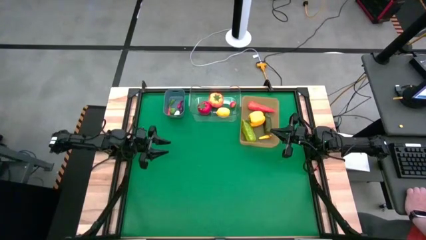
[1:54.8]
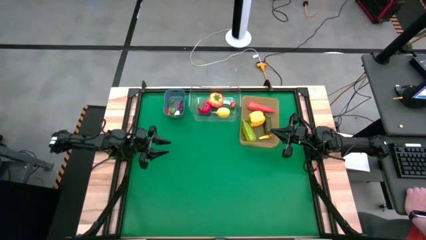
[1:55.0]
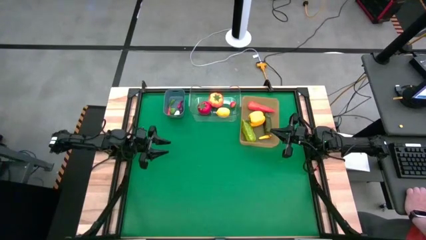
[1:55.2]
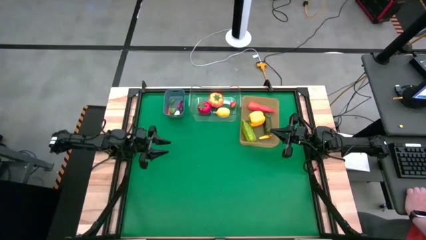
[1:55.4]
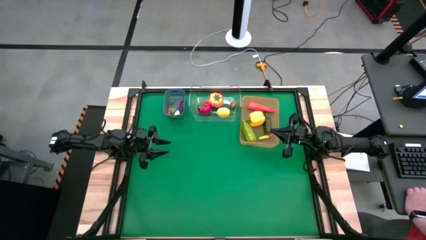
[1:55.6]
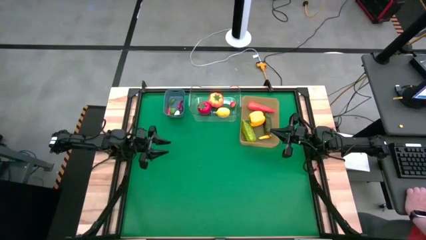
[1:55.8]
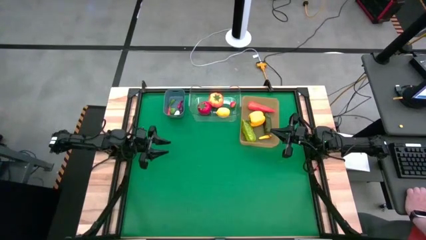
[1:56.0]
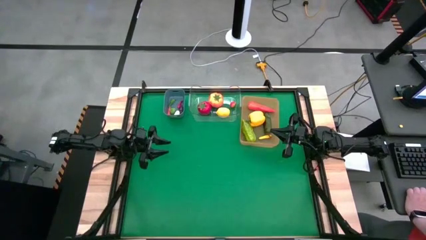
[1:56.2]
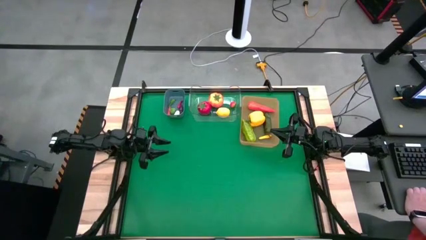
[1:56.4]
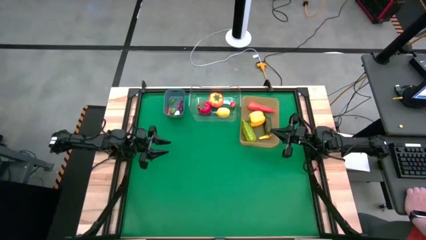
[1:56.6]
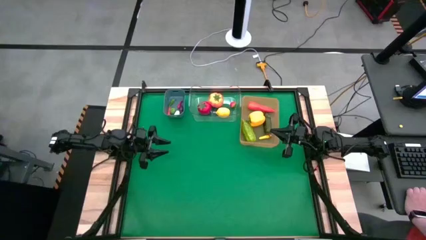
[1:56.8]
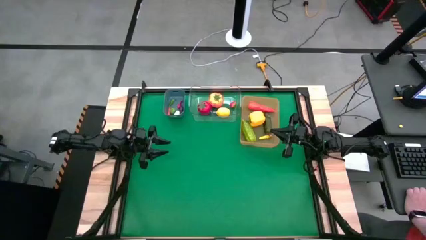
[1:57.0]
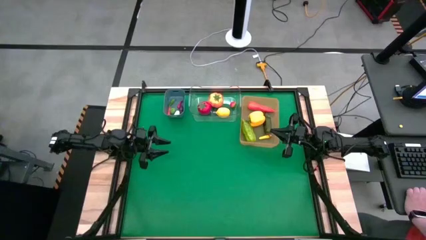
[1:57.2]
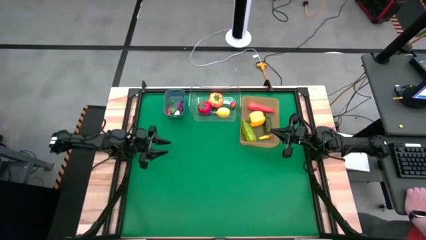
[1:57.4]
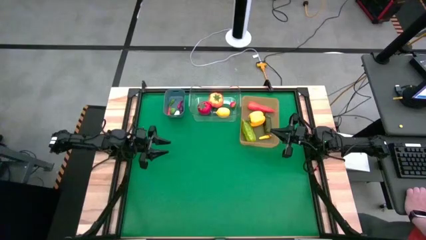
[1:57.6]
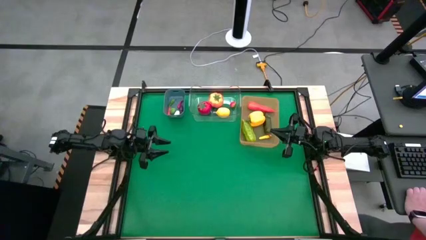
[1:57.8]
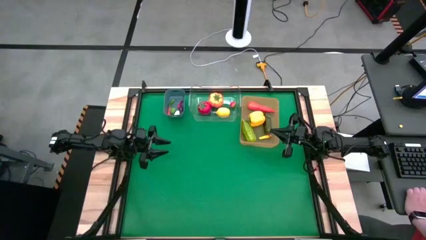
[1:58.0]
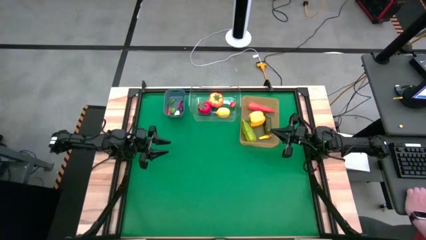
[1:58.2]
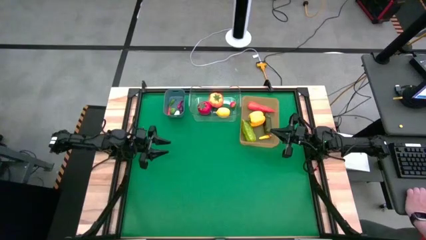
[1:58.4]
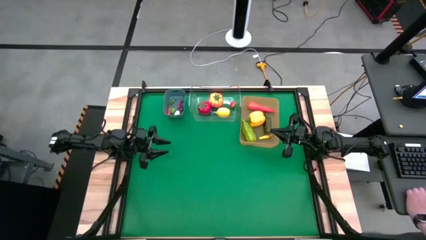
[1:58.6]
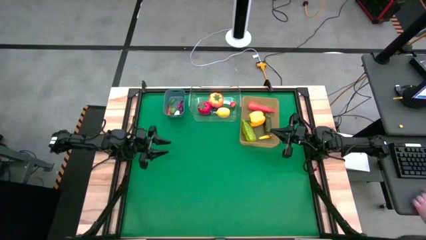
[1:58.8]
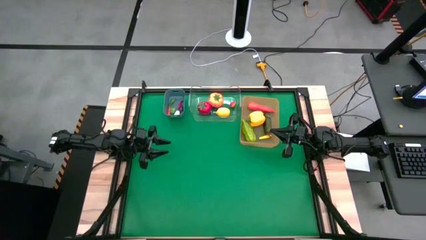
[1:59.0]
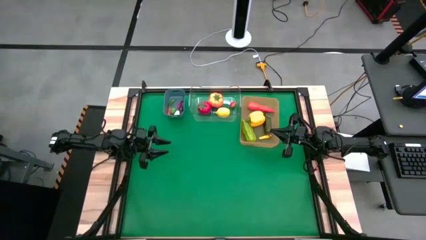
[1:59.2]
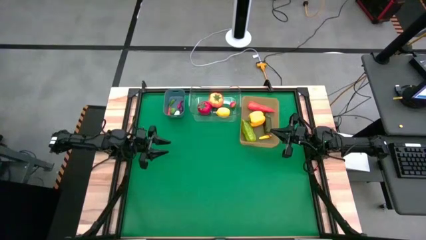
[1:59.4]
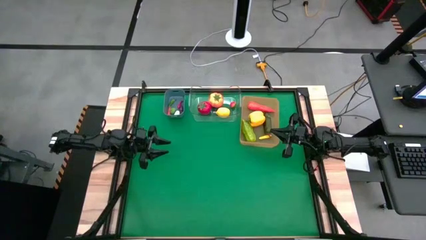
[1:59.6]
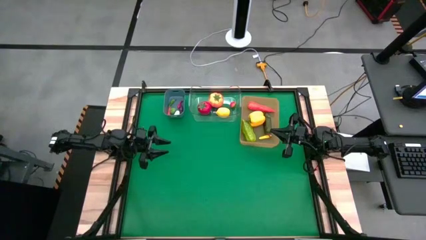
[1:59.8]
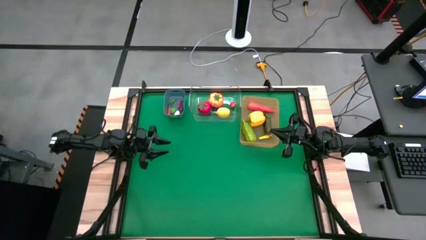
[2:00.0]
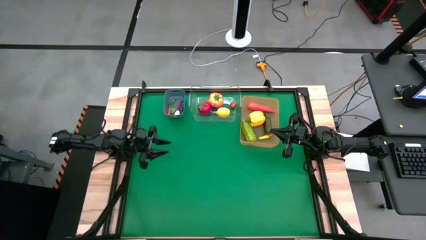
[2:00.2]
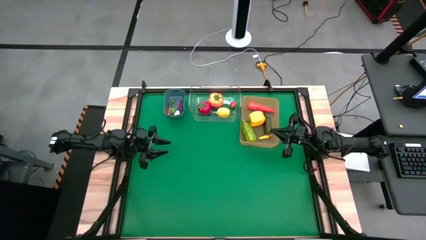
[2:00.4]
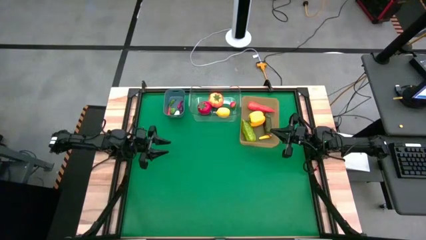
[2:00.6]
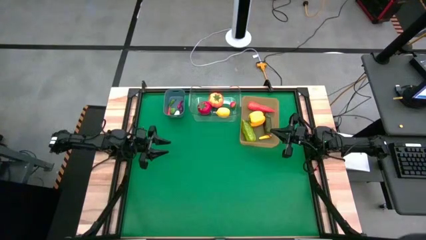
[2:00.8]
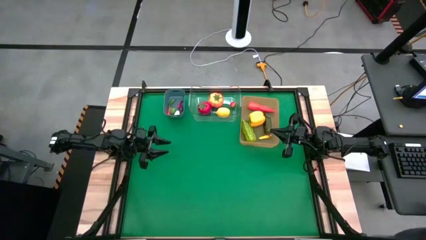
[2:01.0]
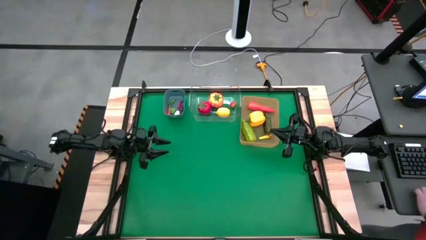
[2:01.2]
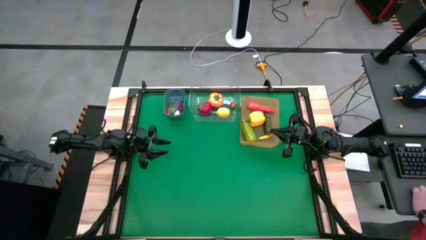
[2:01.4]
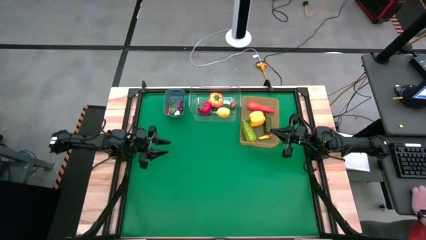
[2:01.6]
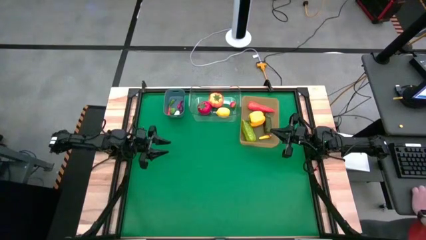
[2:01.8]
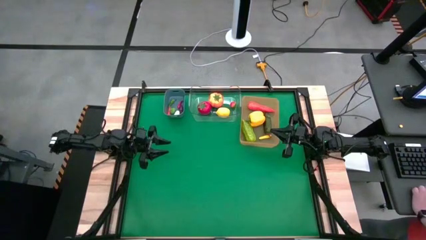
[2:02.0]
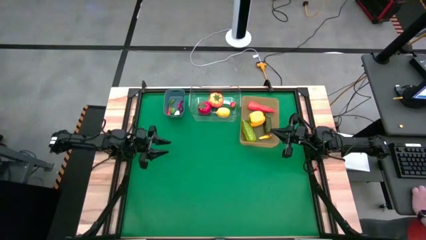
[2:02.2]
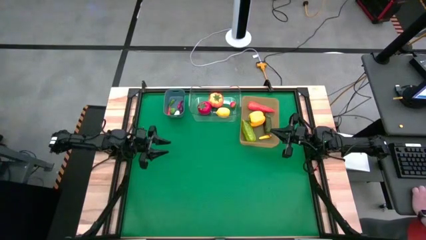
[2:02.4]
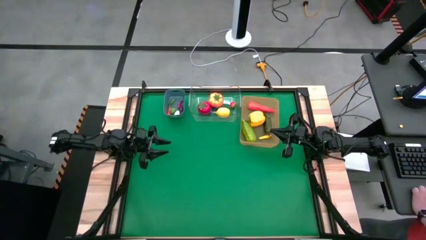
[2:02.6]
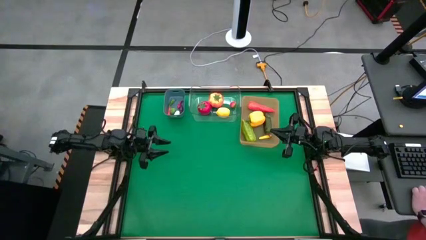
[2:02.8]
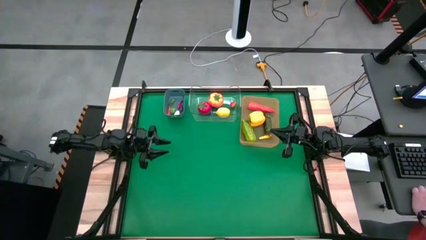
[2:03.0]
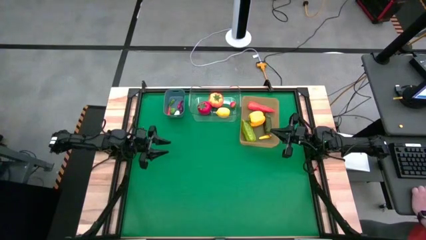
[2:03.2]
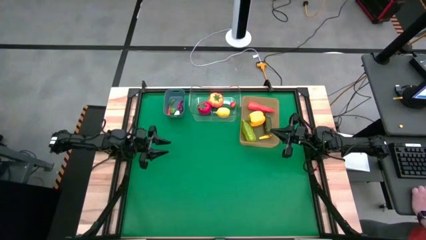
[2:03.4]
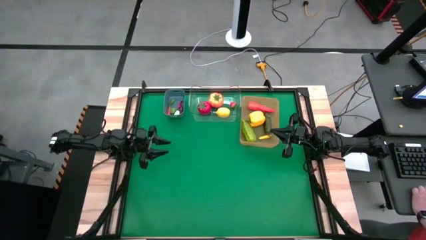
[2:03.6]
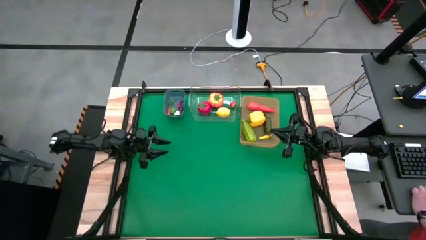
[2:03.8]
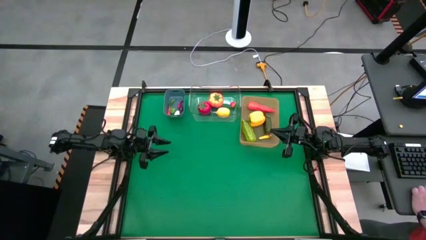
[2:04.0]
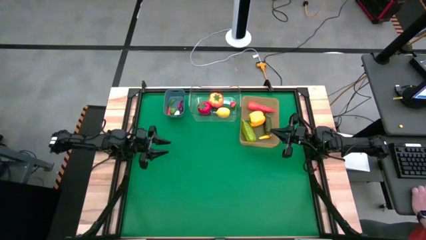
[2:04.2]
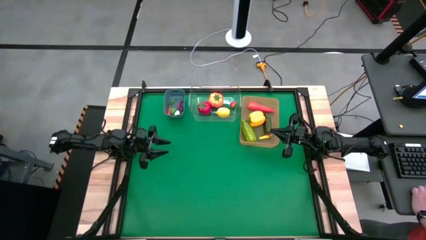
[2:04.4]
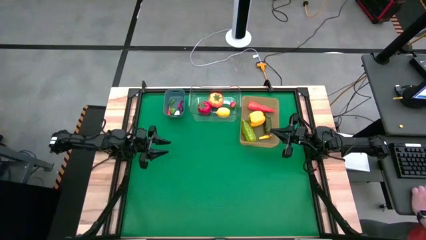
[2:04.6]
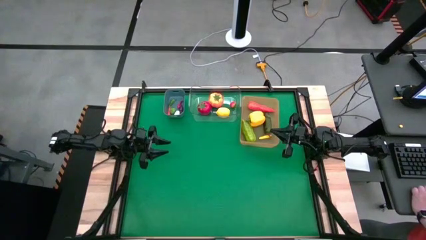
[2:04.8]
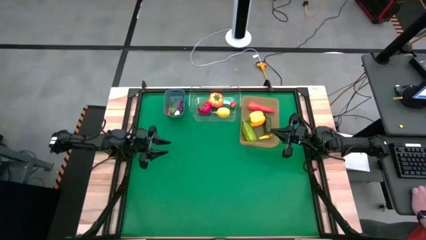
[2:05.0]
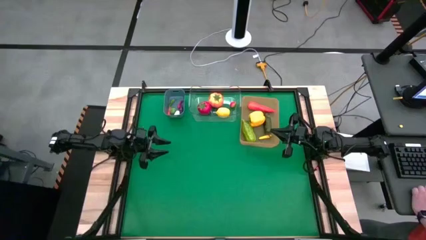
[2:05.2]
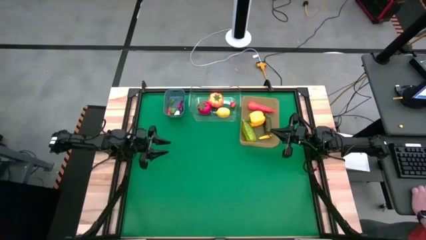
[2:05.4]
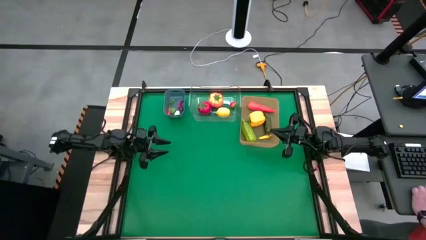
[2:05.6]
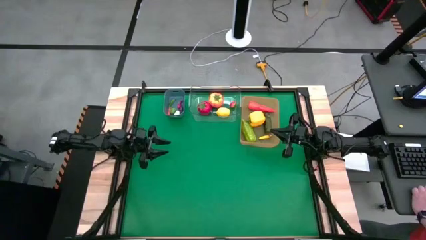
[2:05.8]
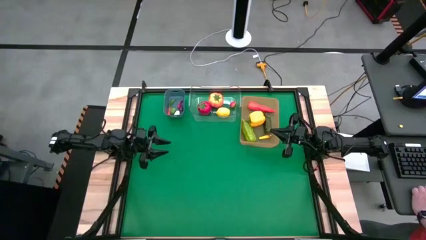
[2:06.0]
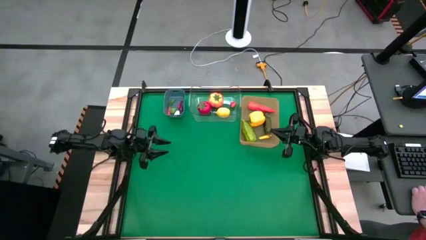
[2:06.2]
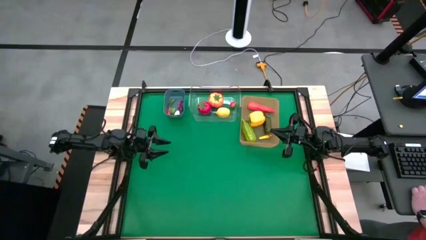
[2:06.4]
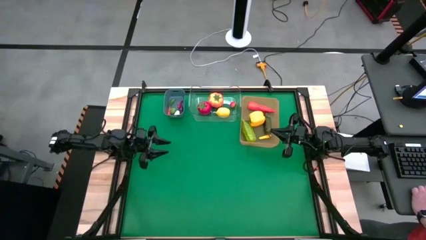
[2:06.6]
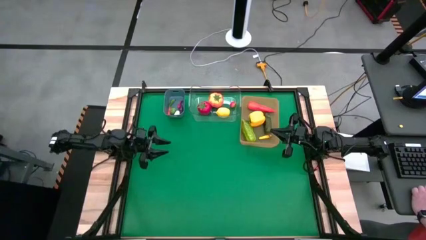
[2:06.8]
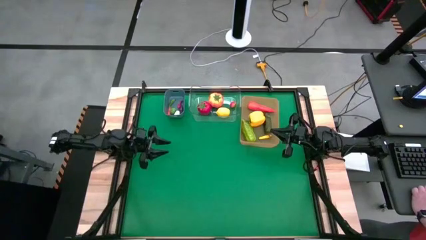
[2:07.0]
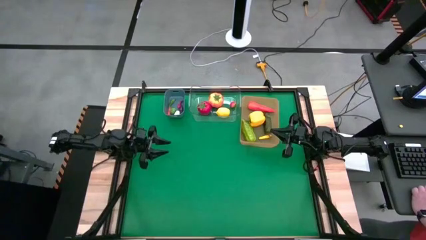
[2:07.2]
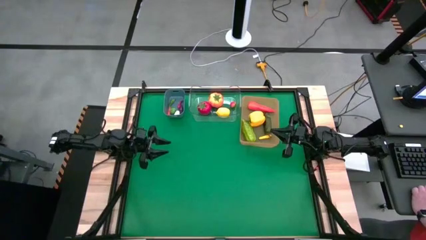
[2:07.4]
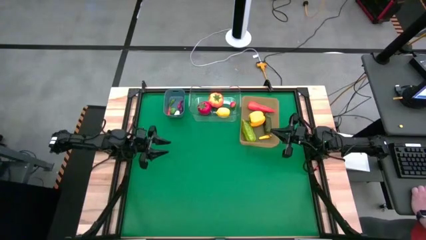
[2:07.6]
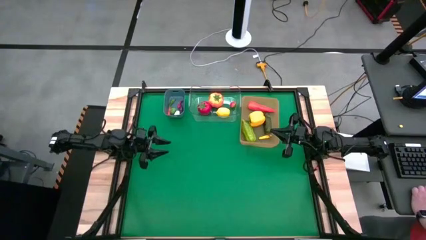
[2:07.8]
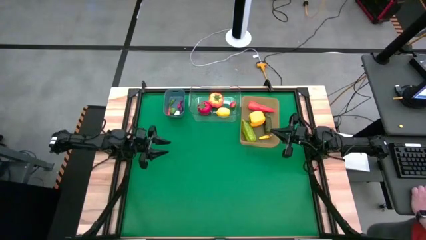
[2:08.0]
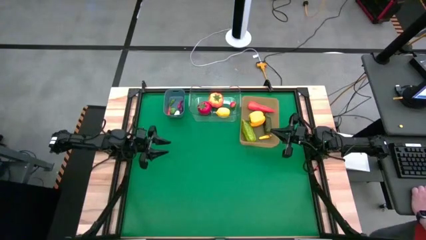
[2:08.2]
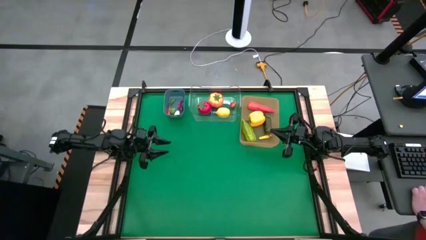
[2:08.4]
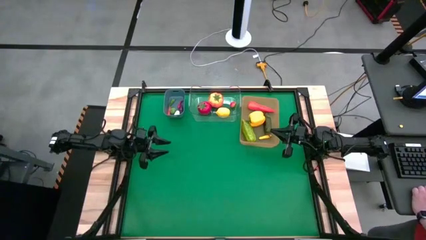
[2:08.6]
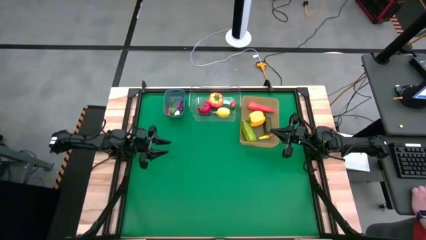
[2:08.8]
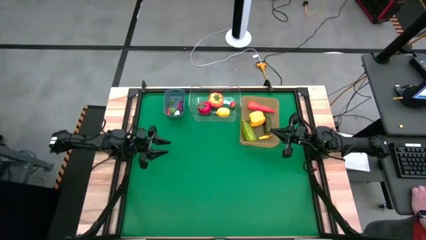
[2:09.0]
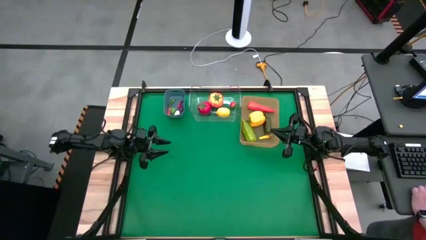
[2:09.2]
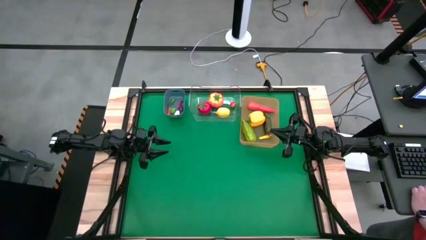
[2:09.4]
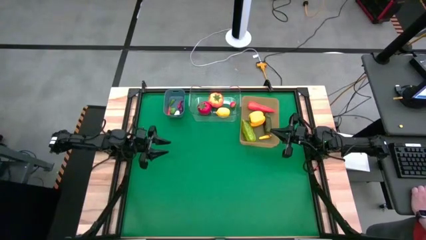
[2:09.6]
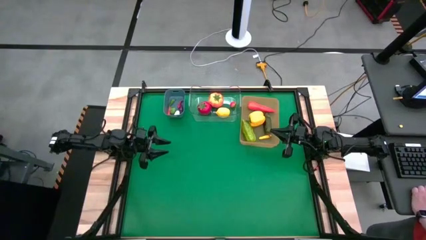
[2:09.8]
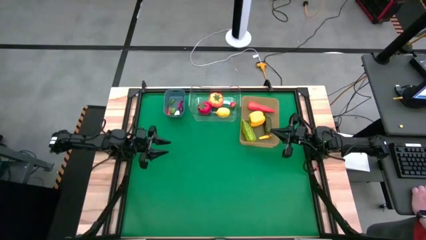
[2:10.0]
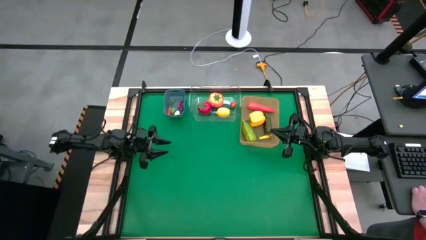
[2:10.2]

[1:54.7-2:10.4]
Task: Sort produce into baskets
Return to Home Position

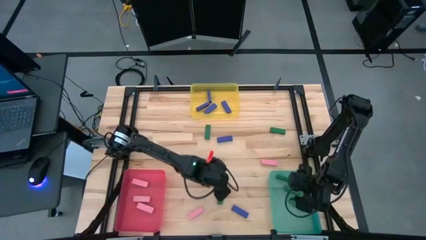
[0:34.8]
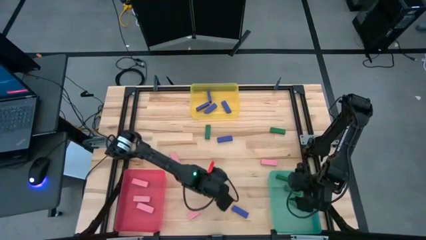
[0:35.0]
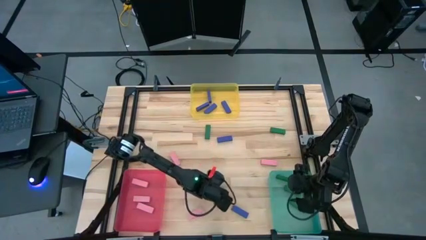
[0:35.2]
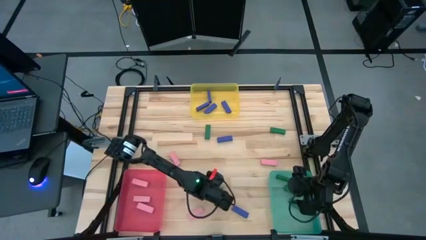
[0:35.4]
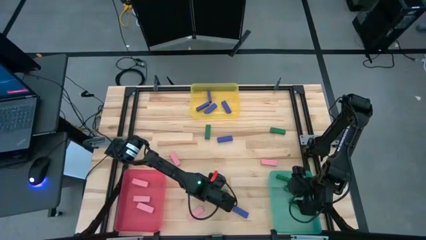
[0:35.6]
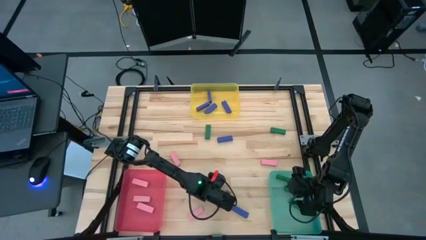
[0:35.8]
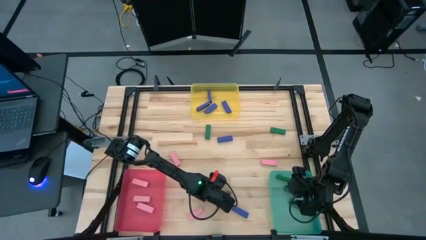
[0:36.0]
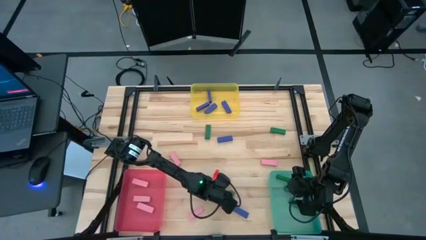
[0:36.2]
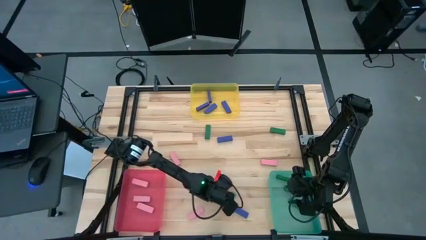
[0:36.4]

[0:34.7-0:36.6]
Task: Sort blocks
Put the green block into the light green bin
